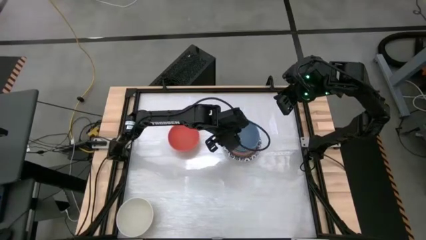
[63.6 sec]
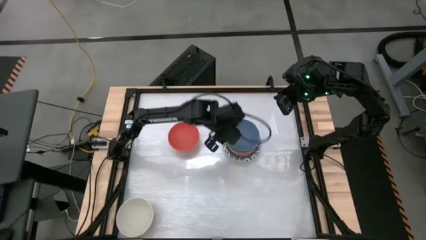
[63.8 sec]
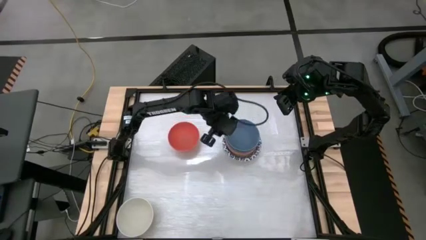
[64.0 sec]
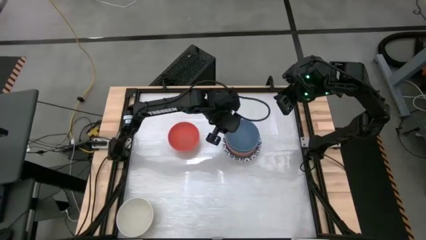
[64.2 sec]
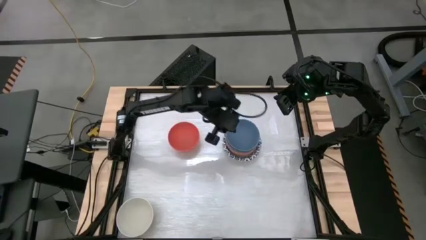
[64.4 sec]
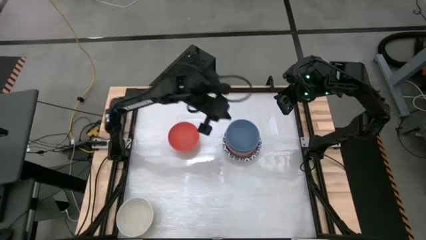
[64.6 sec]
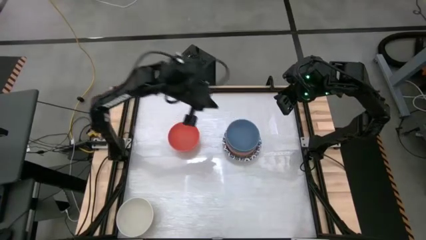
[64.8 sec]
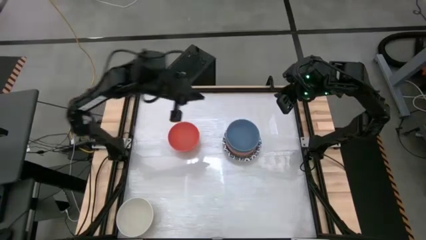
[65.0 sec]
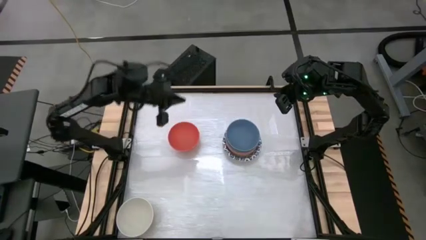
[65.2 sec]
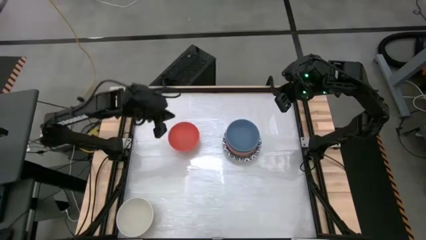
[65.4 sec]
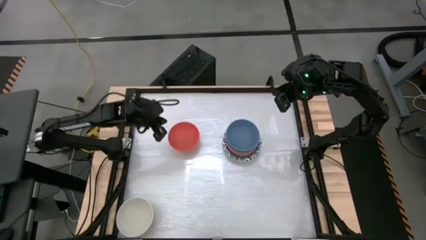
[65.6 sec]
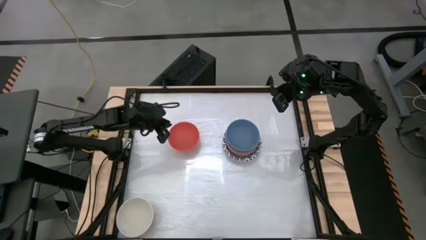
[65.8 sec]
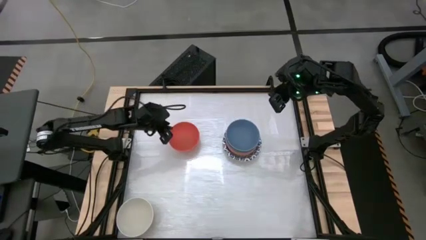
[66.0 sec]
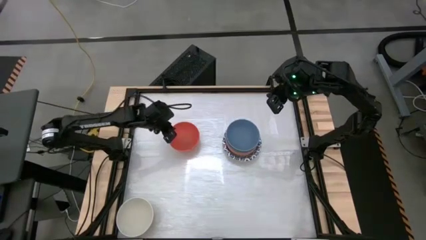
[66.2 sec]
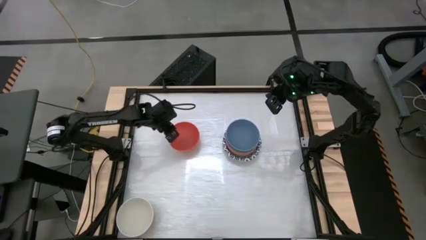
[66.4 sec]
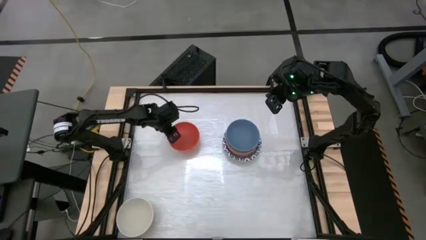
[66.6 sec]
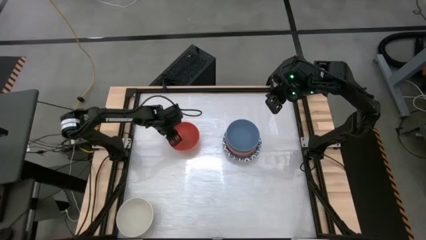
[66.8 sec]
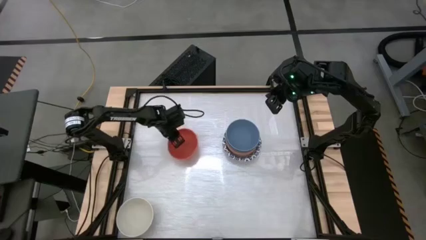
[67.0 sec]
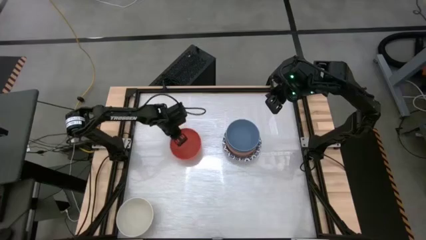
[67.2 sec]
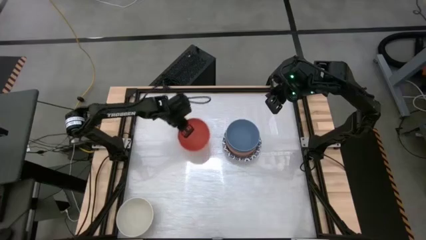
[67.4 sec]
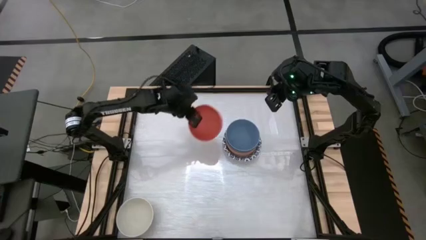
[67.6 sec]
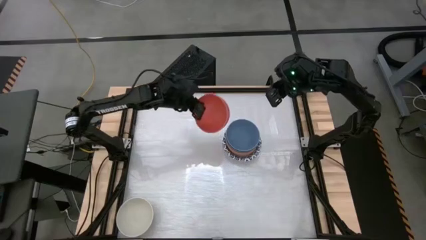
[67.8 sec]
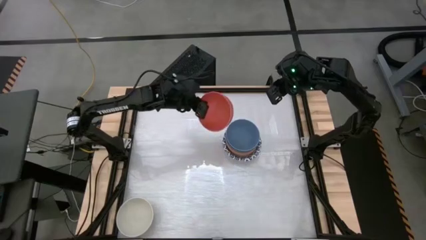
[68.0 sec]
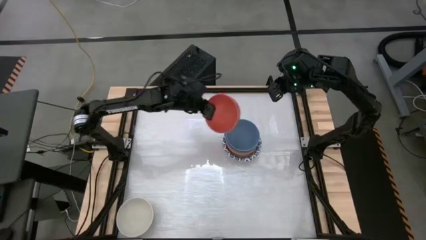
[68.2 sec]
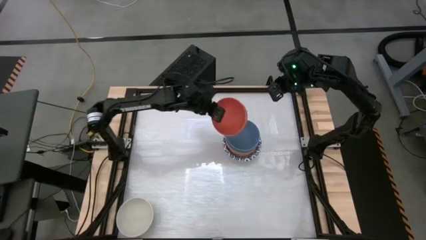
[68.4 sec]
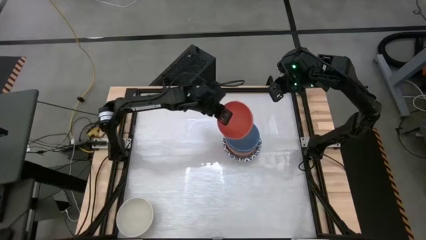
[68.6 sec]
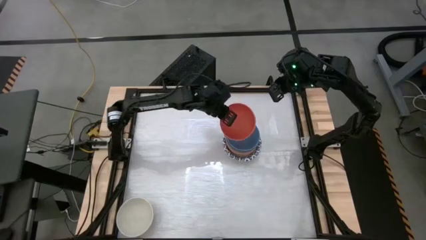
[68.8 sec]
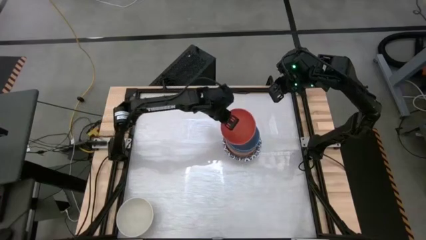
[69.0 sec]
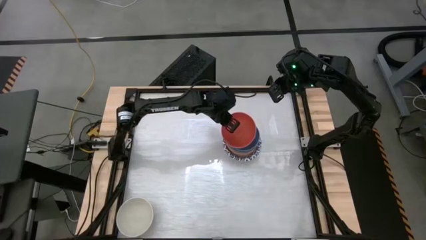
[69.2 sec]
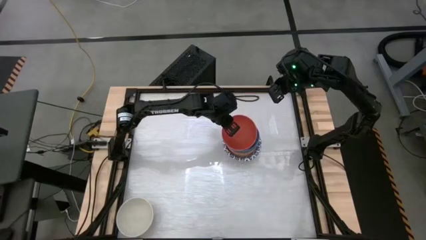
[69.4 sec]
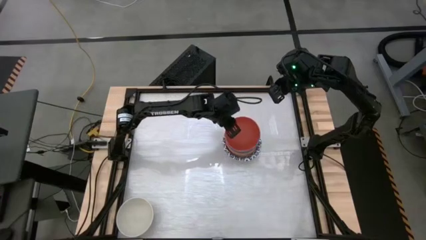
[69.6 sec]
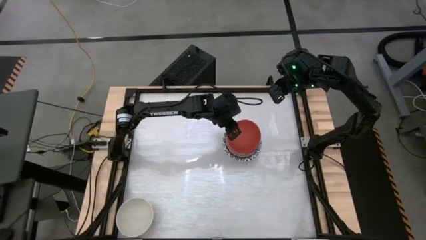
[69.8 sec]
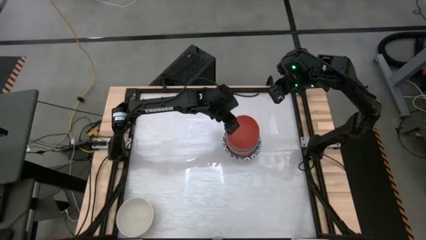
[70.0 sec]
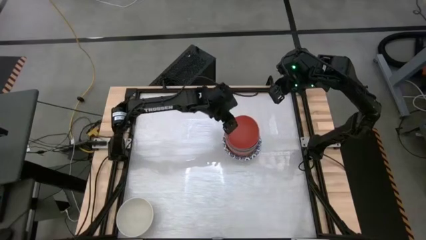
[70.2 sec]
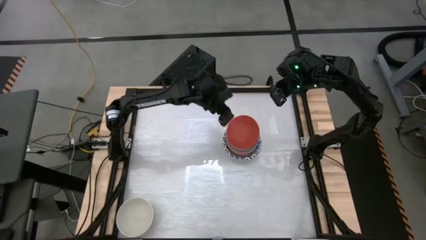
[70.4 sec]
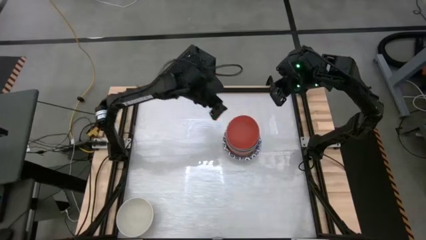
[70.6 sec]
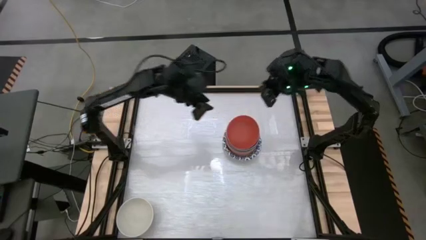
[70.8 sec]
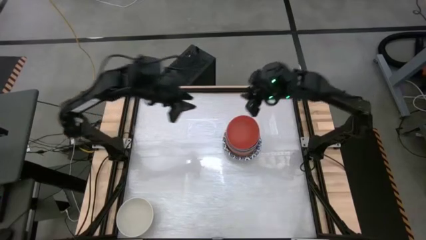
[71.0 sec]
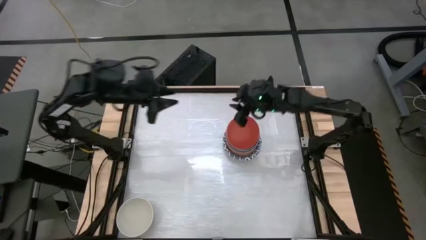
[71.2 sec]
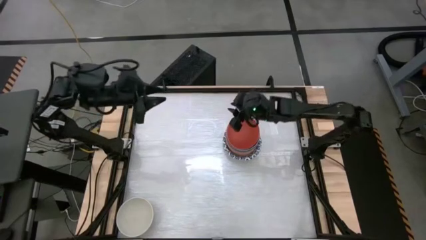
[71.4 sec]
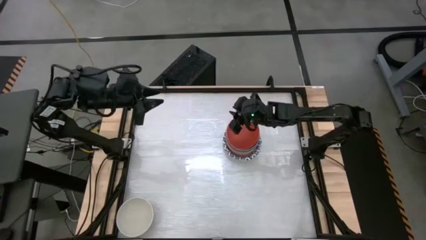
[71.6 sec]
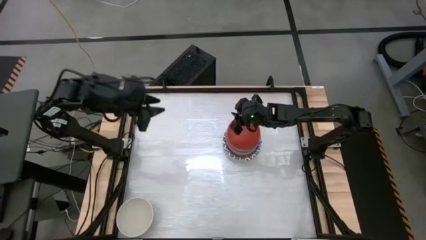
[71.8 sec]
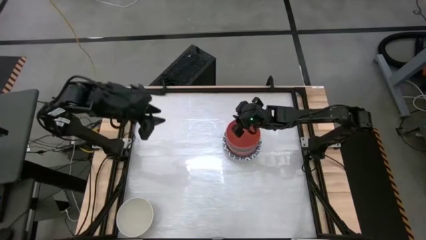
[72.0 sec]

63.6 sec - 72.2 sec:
Stack the orange bowl on top of the blue bowl

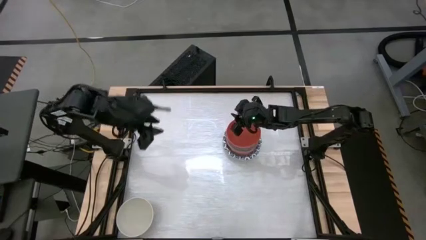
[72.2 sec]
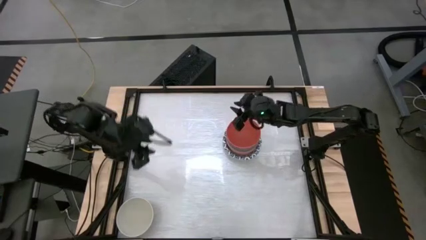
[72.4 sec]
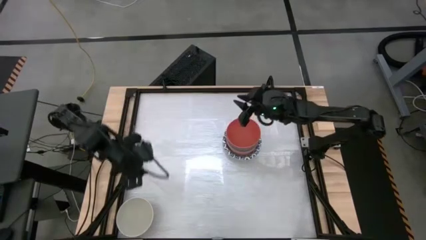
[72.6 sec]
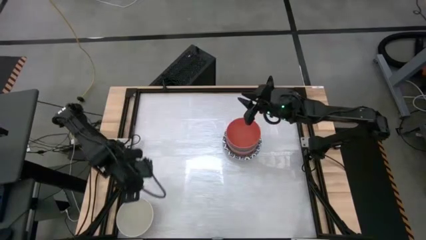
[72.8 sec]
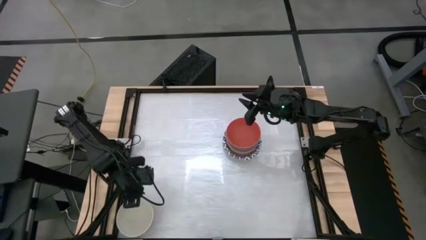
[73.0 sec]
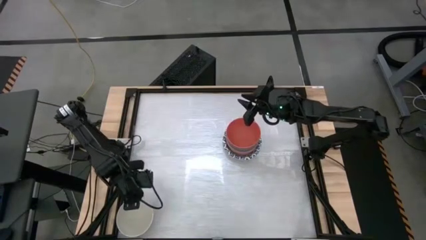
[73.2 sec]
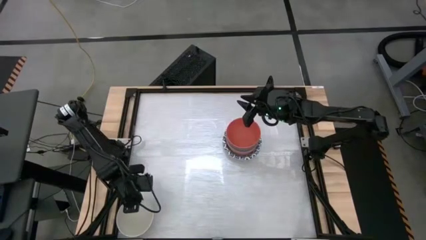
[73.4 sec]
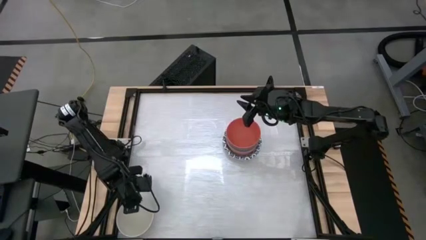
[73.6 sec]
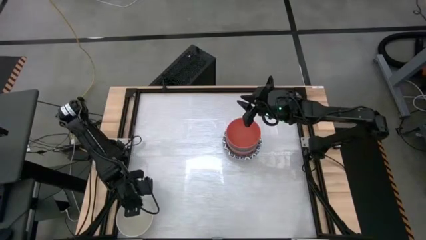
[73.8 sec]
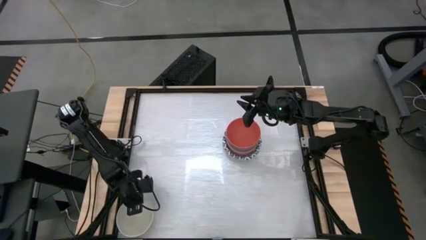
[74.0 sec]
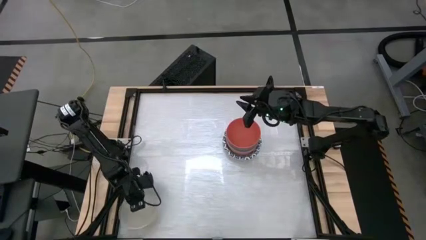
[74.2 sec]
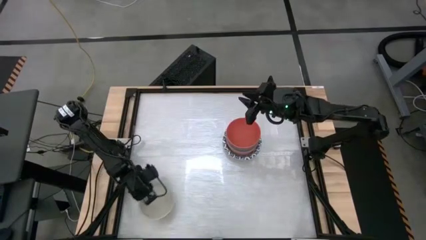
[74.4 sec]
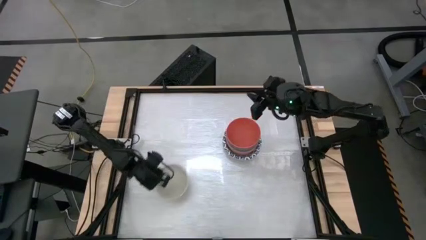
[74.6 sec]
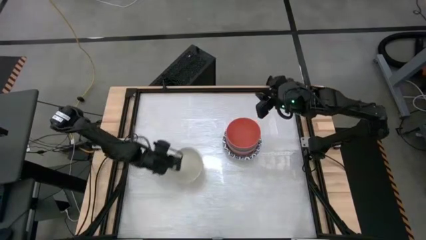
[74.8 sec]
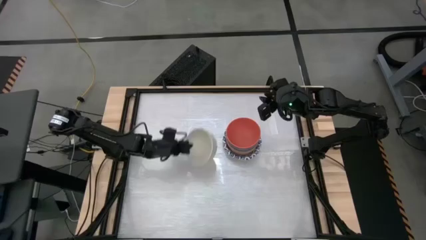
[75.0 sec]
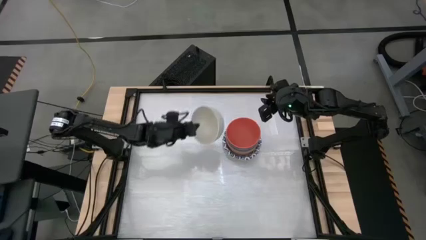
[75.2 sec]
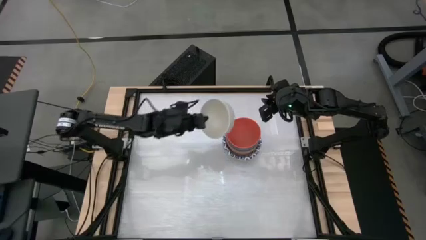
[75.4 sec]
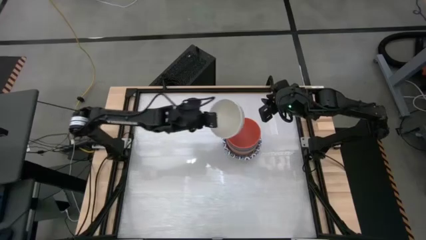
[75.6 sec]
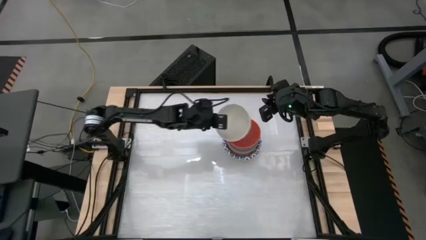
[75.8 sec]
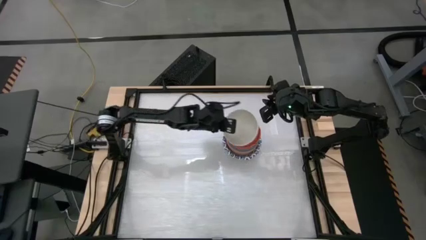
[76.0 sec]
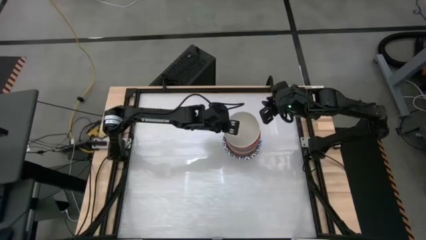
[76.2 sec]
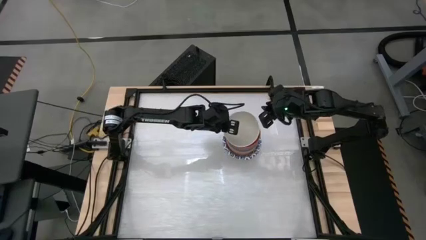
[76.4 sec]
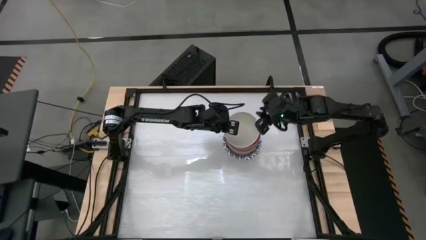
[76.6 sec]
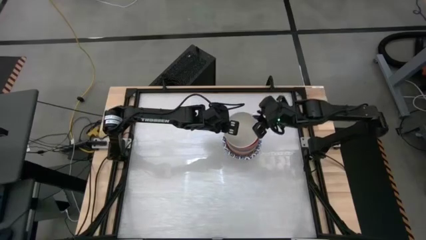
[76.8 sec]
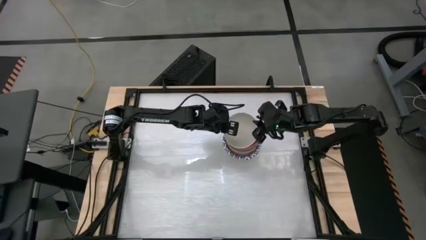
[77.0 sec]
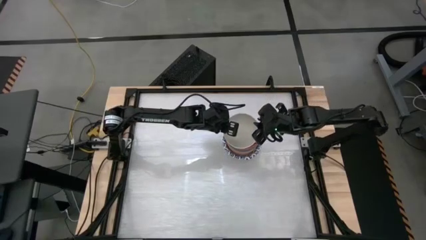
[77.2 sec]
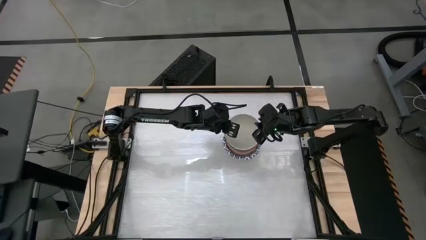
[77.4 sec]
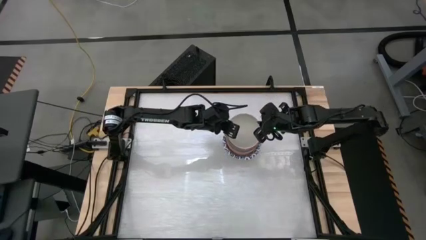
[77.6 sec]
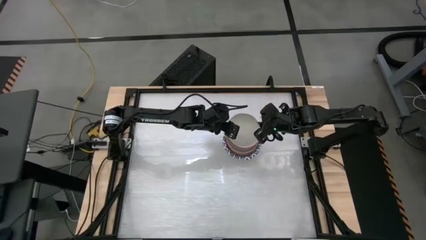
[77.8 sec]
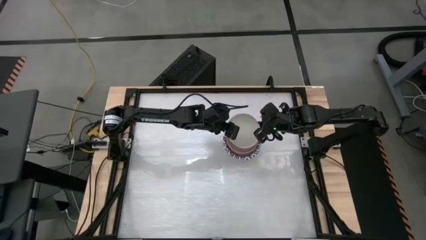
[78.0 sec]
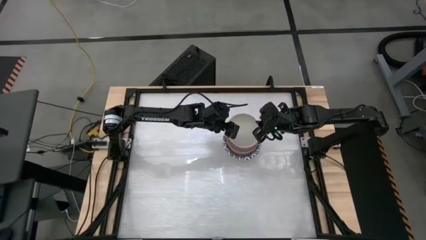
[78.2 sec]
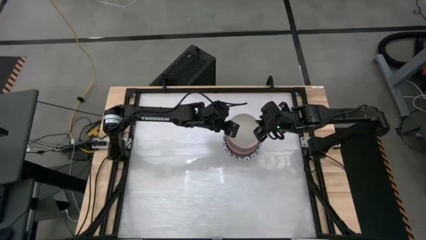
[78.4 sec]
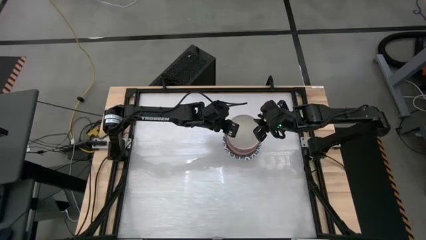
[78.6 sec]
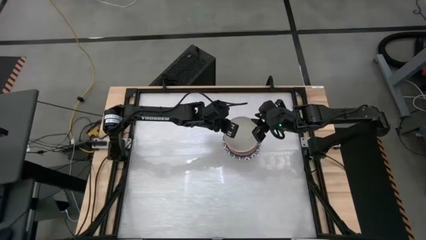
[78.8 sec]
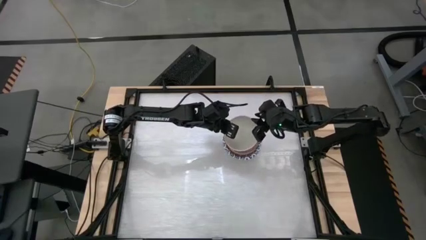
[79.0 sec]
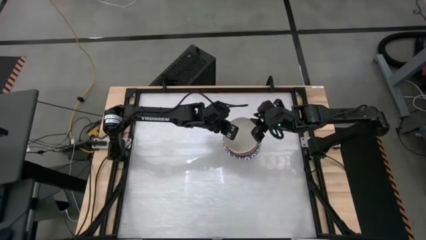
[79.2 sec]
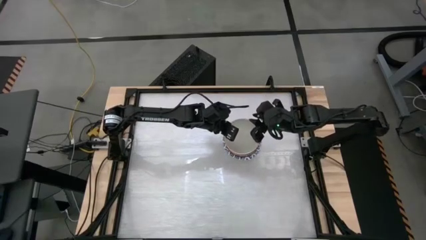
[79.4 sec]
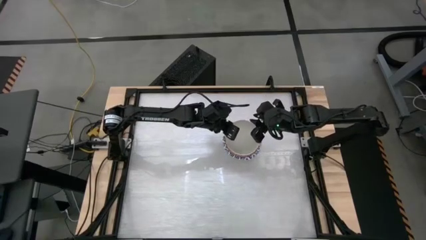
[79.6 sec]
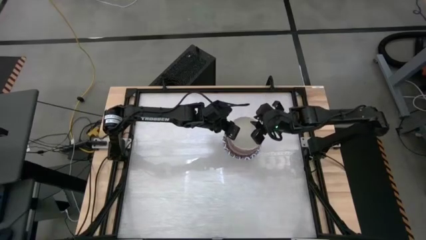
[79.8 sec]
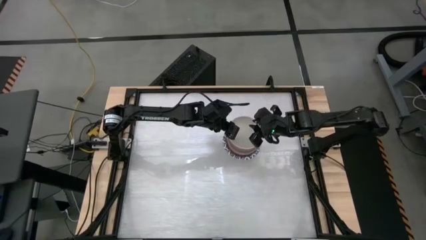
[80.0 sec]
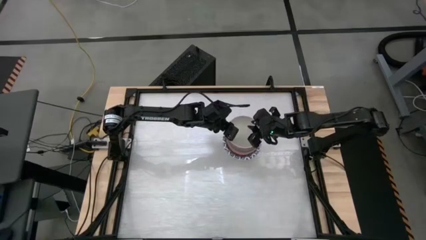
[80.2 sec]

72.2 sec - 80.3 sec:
Stack the white bowl on top of the orange bowl
